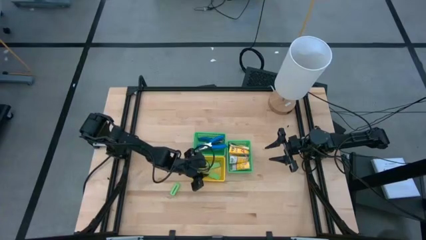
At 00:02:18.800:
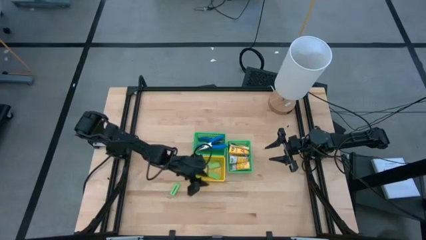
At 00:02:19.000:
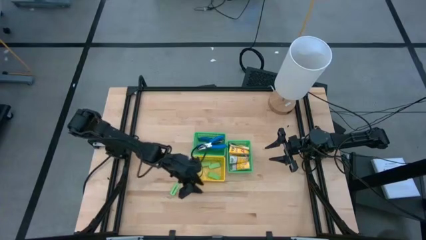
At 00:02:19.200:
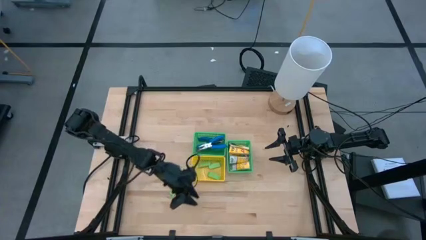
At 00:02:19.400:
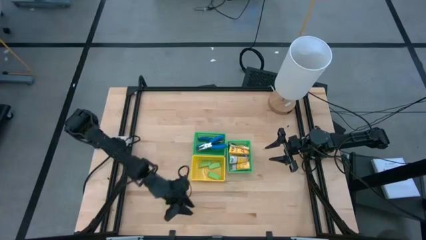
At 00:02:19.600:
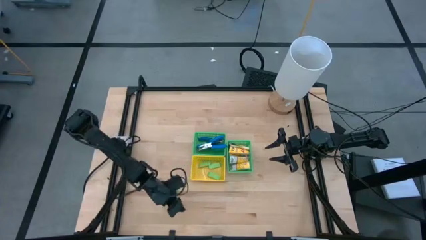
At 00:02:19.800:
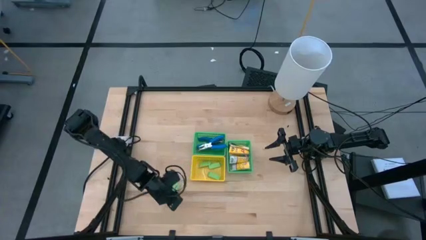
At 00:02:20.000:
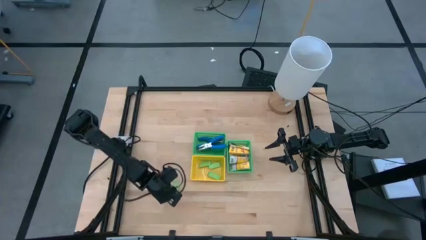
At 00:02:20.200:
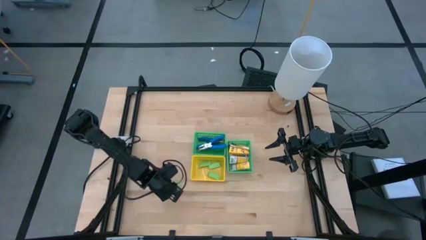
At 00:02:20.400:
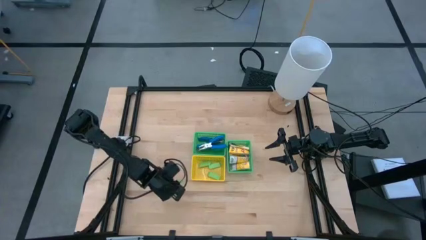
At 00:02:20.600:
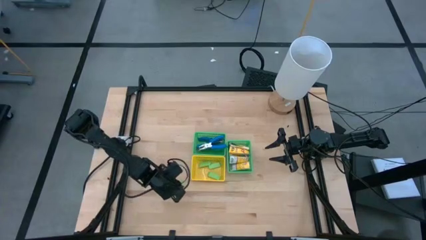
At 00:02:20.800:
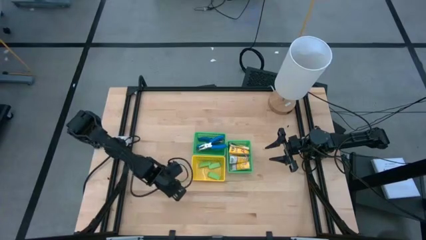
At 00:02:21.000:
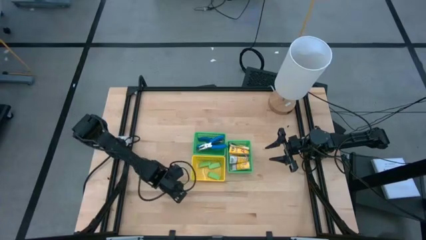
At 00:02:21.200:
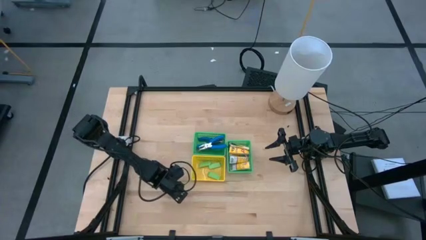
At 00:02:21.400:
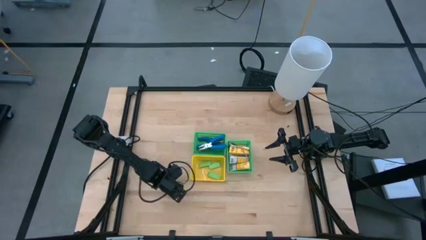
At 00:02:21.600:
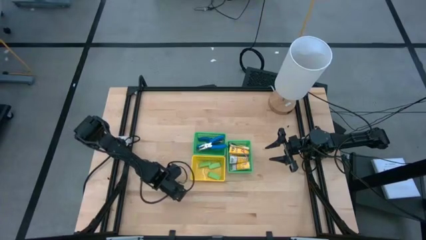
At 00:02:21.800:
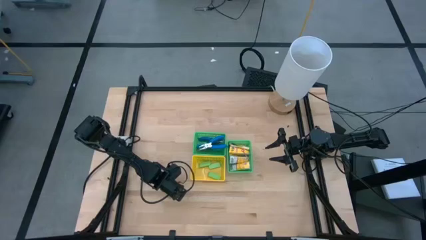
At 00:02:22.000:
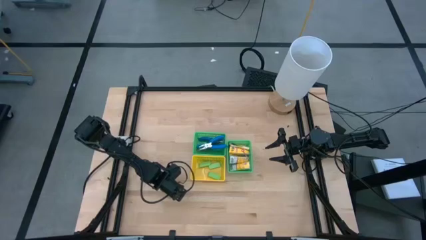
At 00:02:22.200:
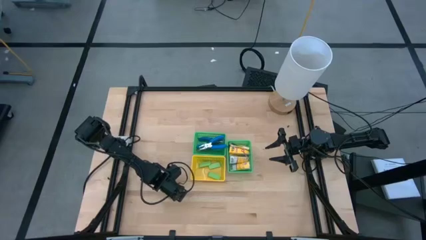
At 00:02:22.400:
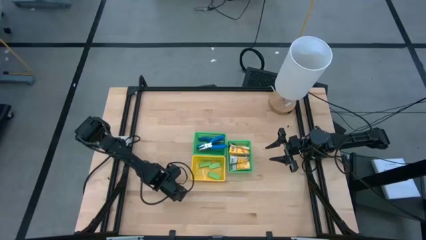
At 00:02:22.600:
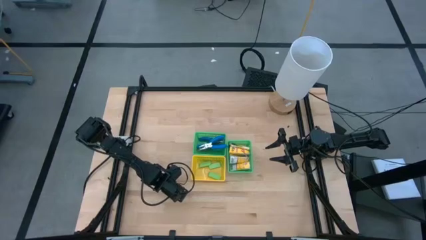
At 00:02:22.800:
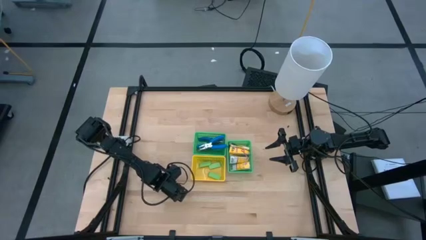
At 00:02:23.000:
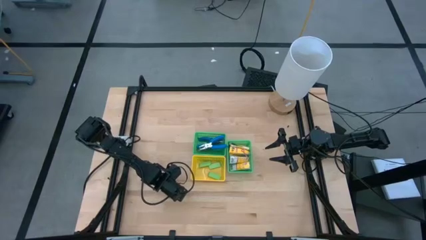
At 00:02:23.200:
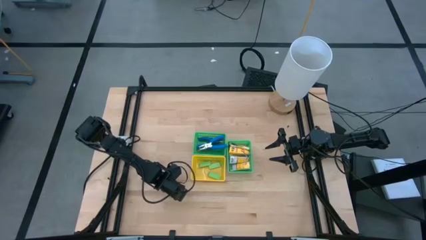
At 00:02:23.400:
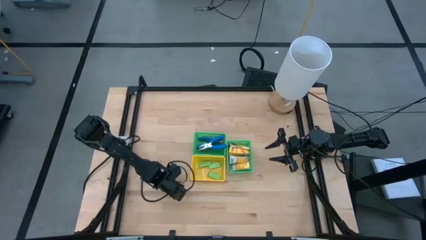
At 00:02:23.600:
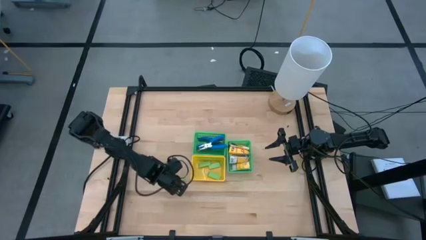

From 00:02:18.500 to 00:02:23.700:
Task: Pick & Place School Supplies
Put the green eraser into the yellow bin

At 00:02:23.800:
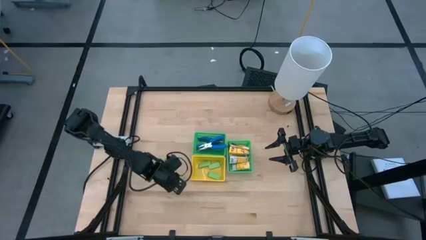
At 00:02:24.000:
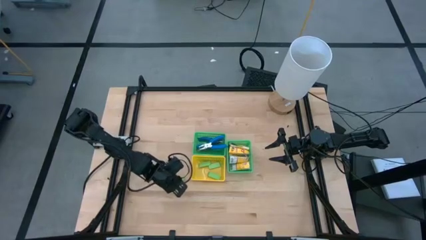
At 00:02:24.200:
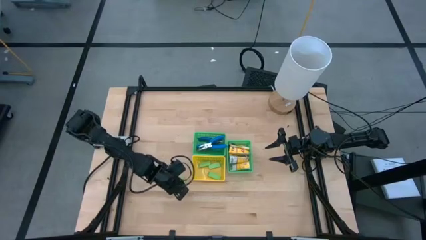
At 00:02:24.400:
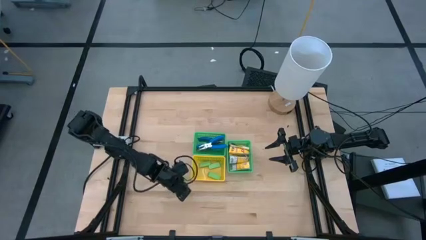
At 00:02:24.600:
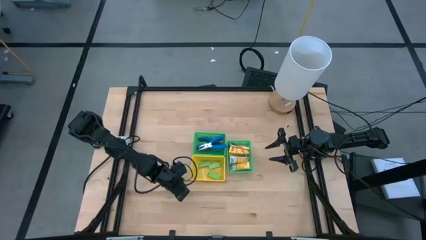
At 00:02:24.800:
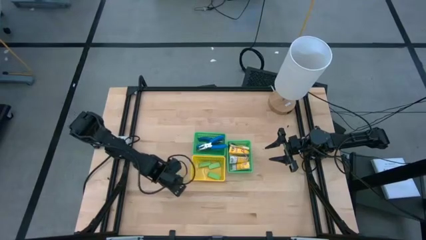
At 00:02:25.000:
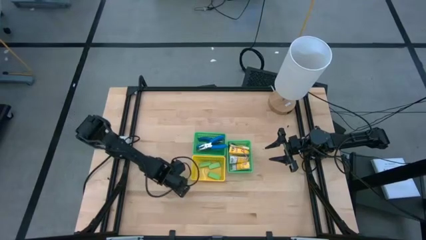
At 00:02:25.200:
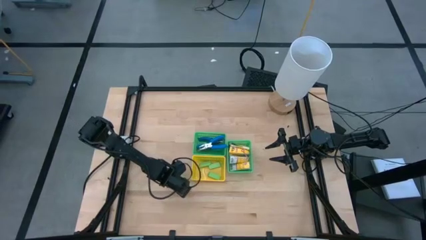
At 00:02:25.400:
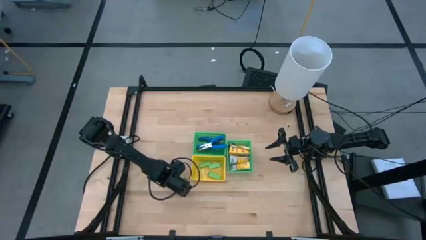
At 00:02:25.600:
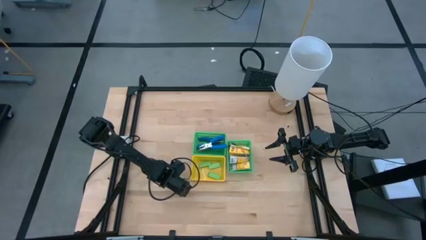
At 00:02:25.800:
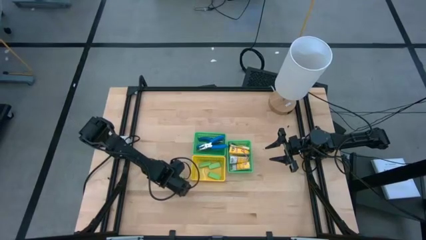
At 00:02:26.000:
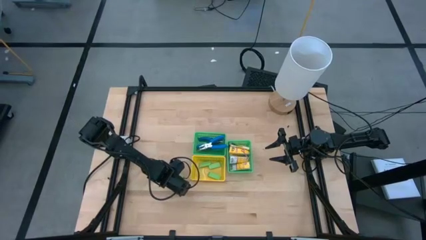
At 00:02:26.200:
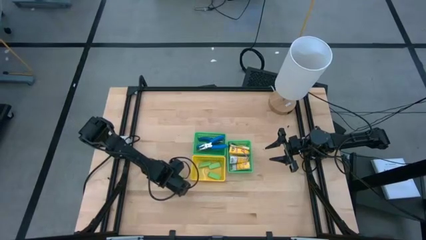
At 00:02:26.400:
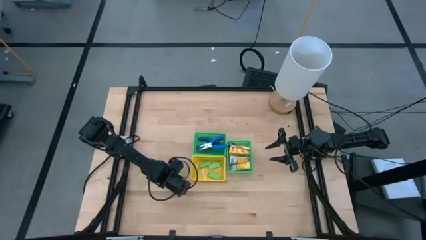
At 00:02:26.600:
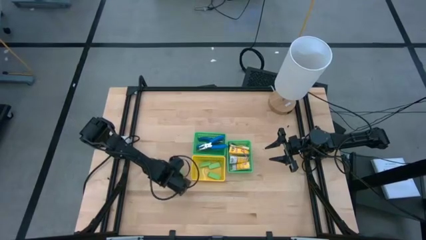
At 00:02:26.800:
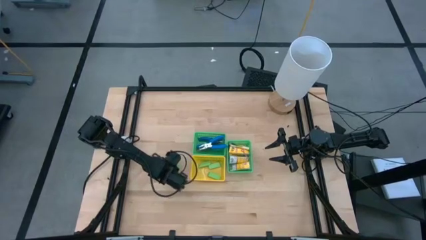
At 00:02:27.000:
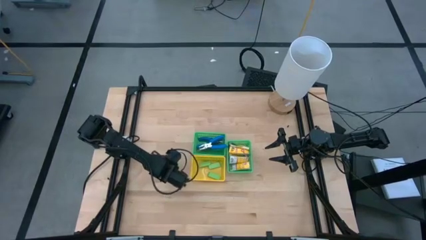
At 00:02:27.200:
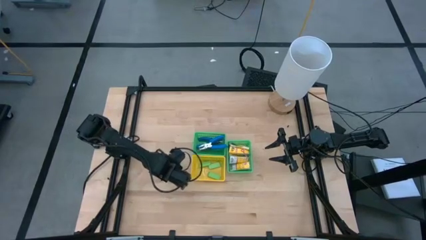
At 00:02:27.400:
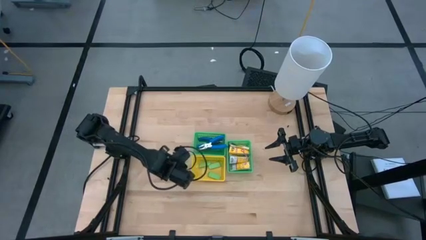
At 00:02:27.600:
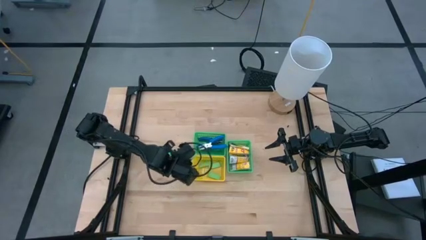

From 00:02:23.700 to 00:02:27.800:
Put the green eraser into the bottom yellow bin

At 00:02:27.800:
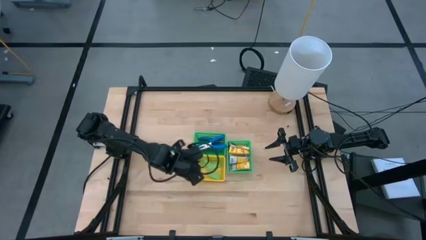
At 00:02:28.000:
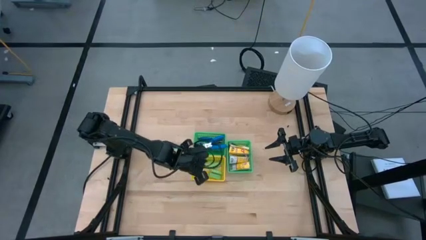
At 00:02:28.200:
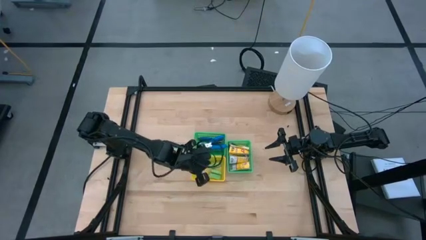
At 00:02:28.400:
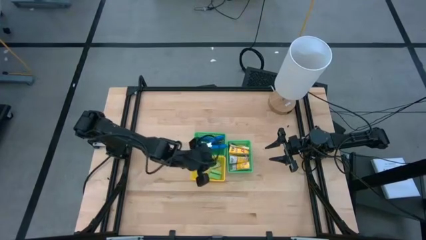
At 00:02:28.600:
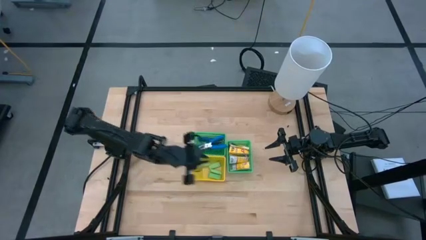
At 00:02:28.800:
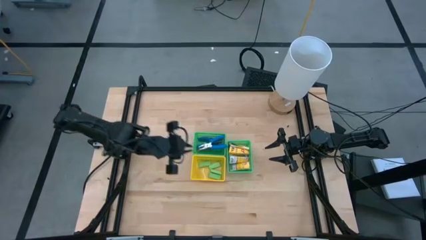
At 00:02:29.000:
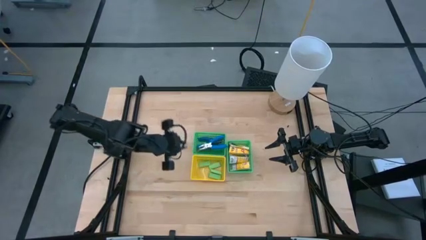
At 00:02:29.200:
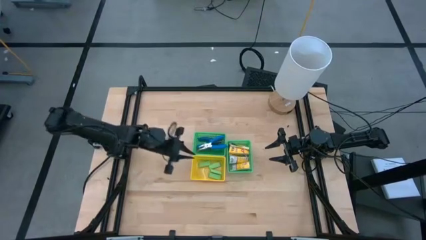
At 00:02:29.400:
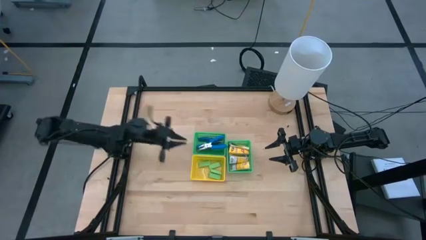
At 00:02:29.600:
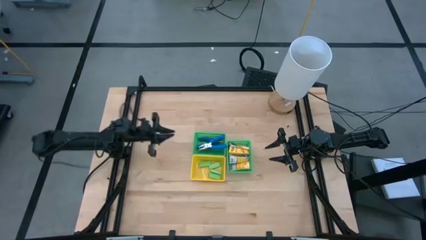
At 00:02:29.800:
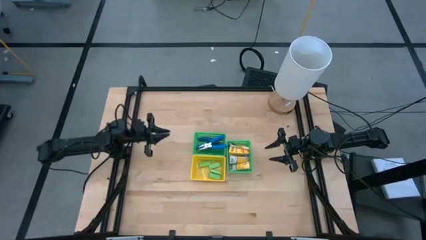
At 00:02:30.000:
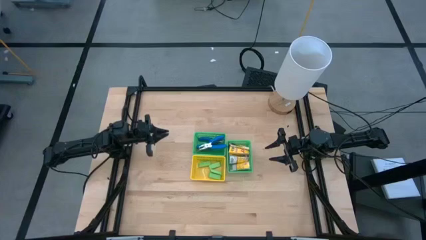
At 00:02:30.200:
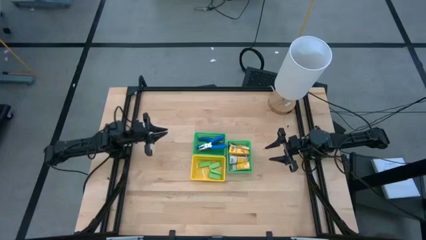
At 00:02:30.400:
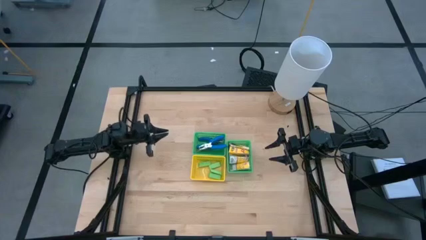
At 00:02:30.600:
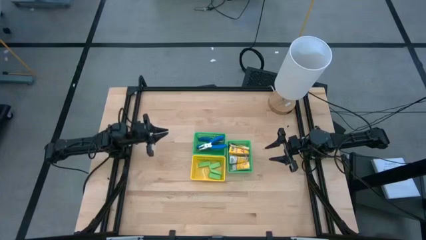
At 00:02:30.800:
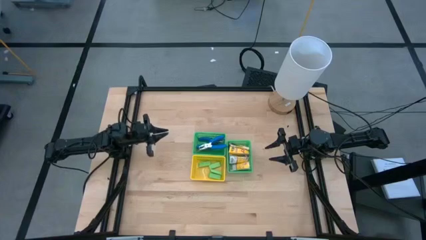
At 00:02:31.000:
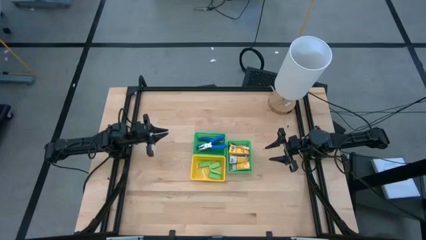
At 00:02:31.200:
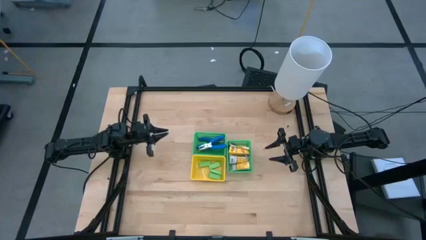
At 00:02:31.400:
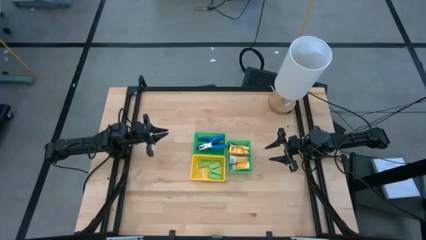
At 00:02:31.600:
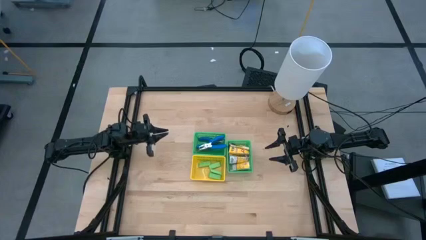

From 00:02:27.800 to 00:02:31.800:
Return to Home Position
